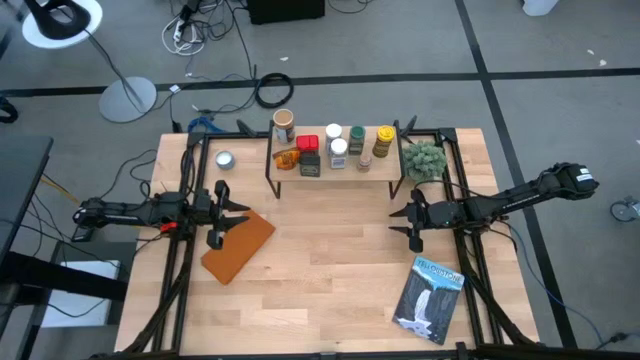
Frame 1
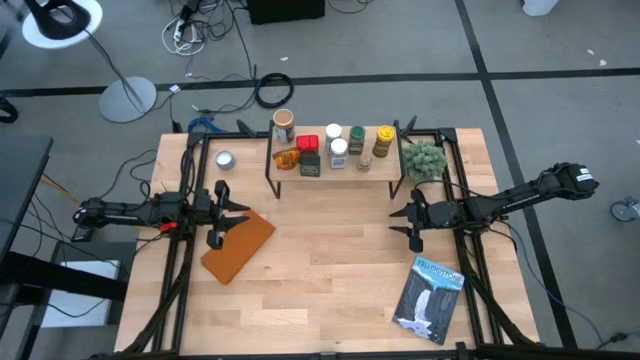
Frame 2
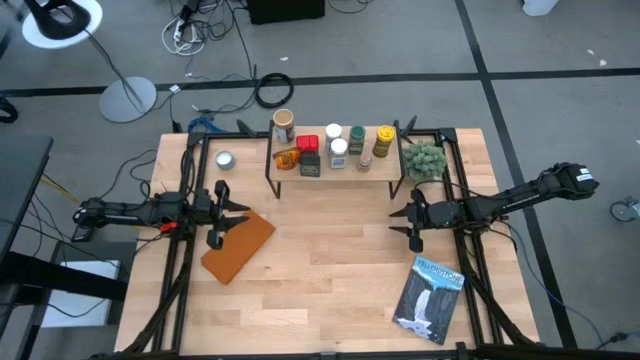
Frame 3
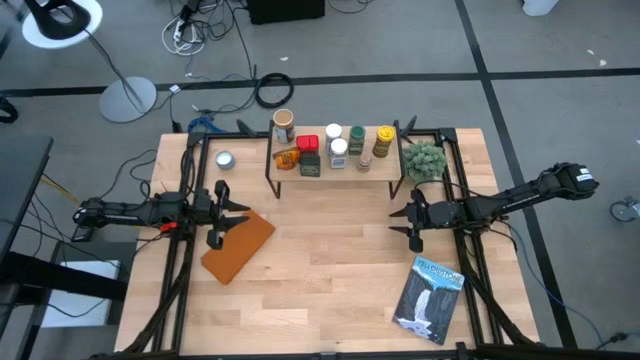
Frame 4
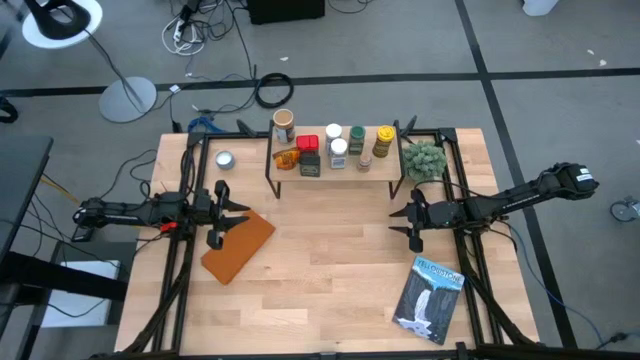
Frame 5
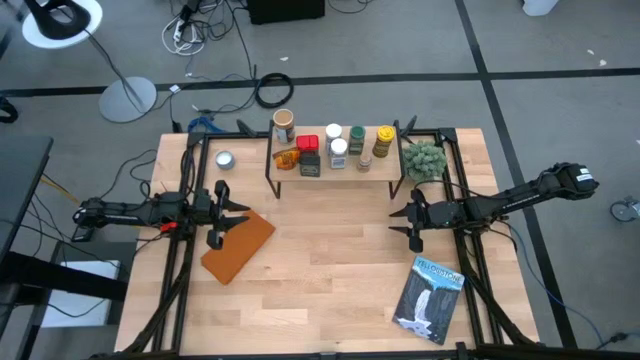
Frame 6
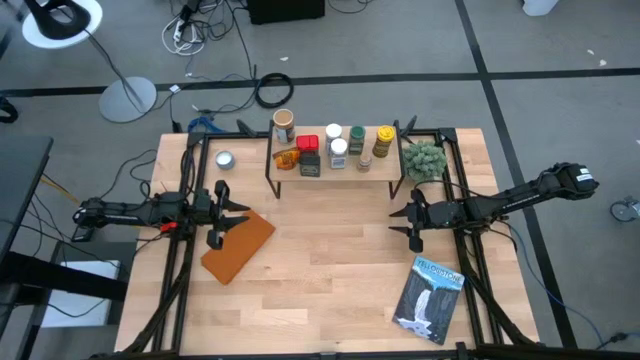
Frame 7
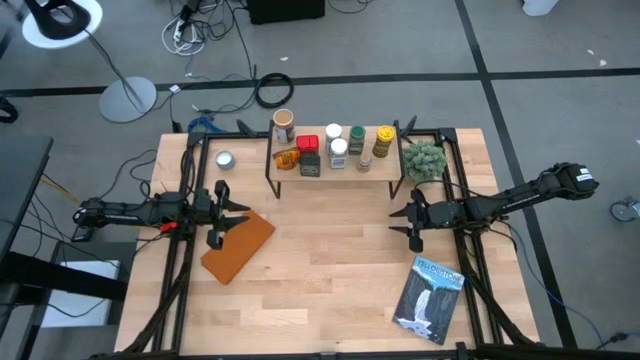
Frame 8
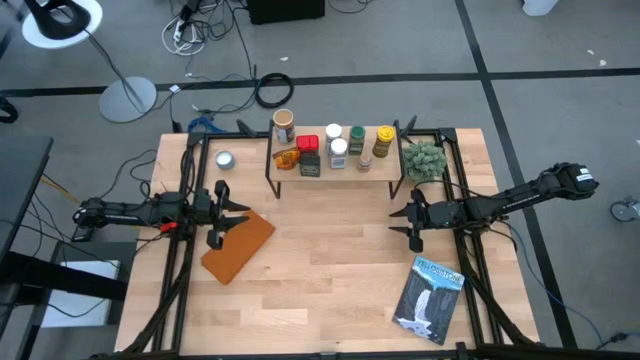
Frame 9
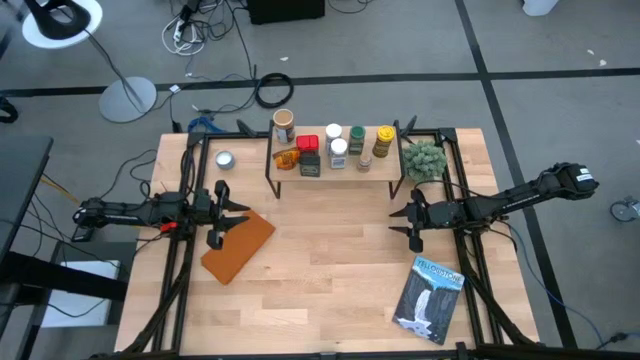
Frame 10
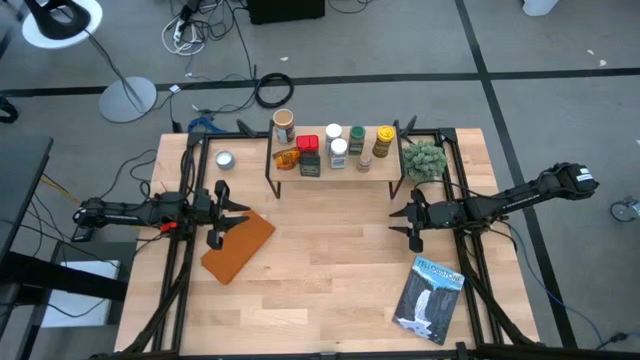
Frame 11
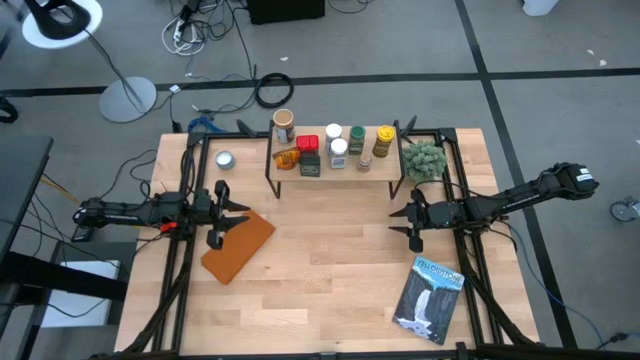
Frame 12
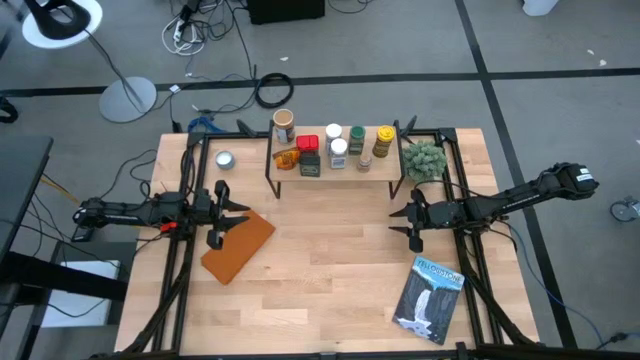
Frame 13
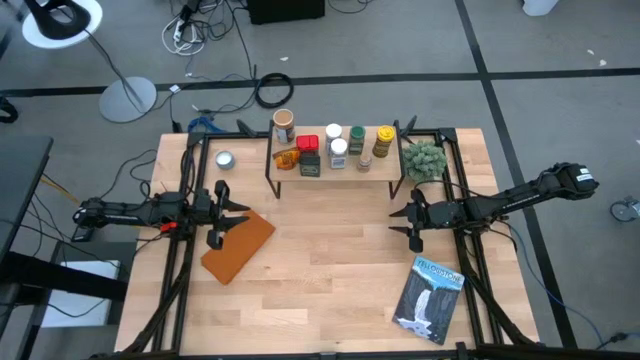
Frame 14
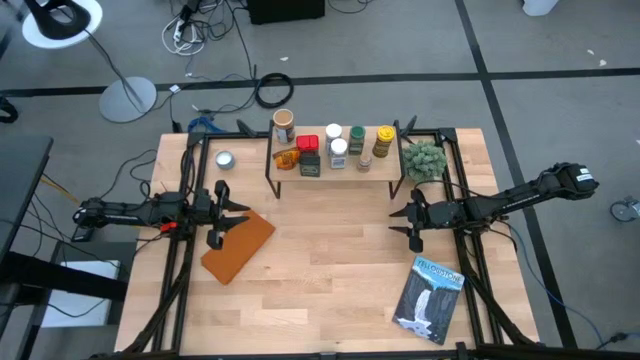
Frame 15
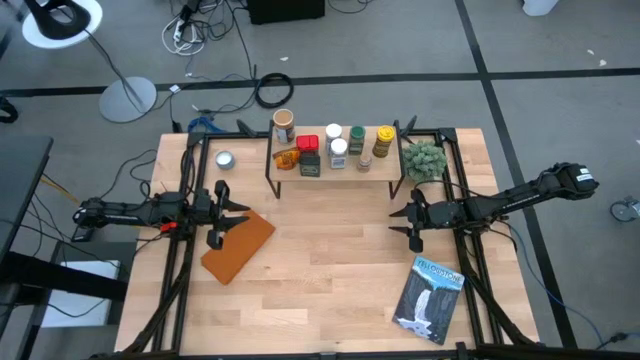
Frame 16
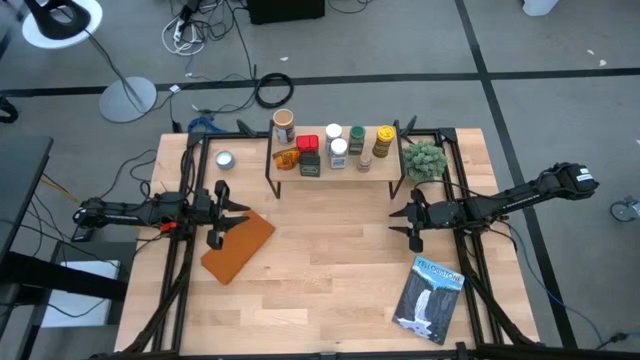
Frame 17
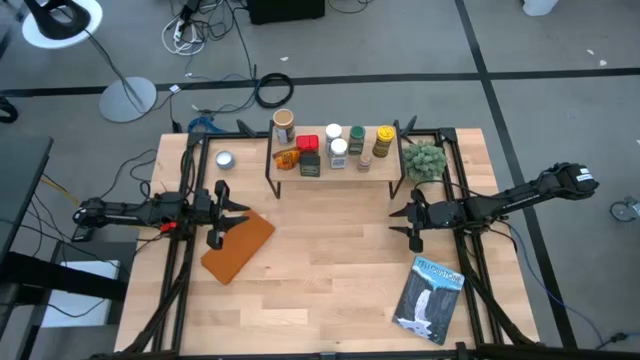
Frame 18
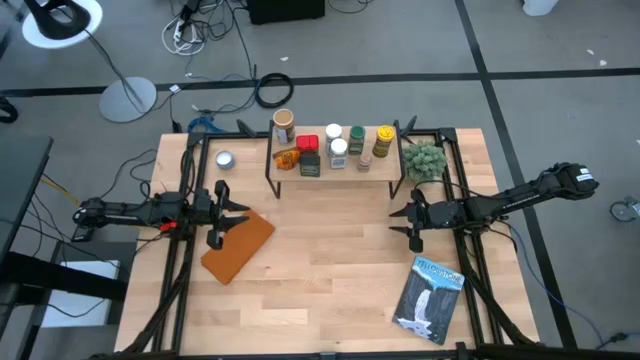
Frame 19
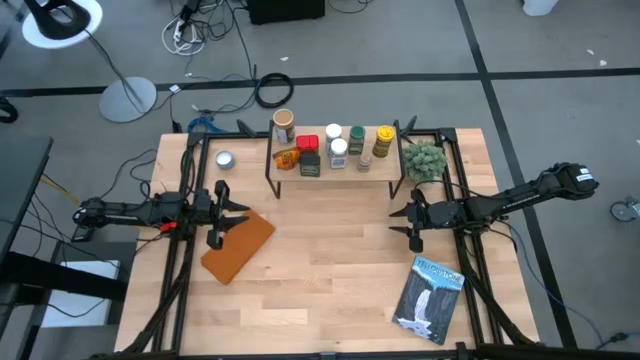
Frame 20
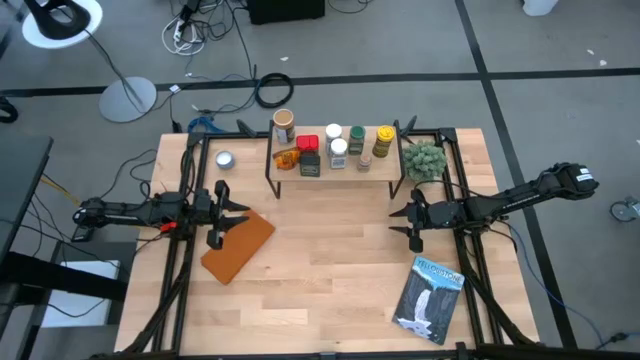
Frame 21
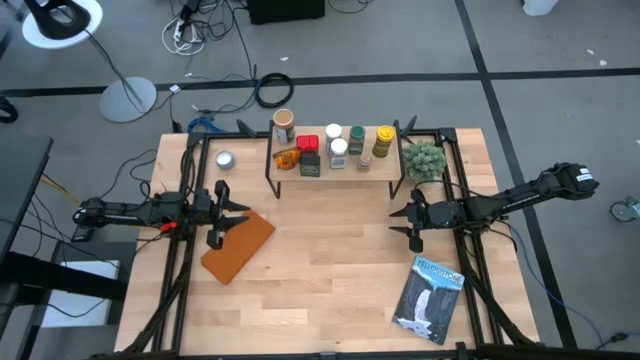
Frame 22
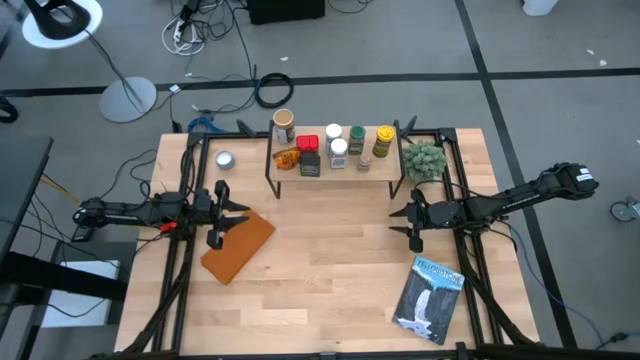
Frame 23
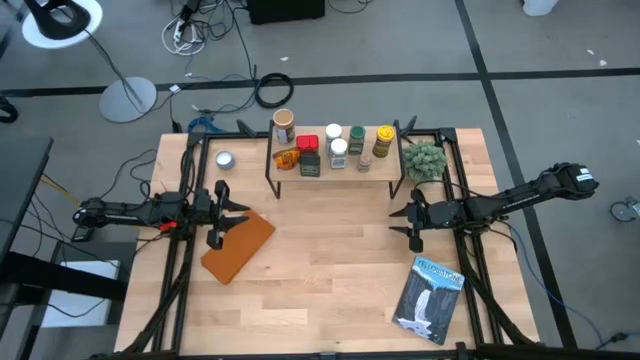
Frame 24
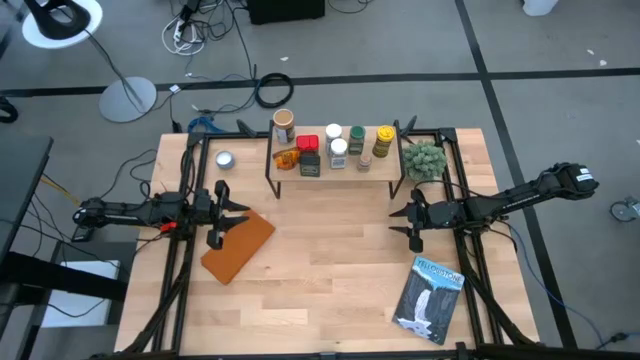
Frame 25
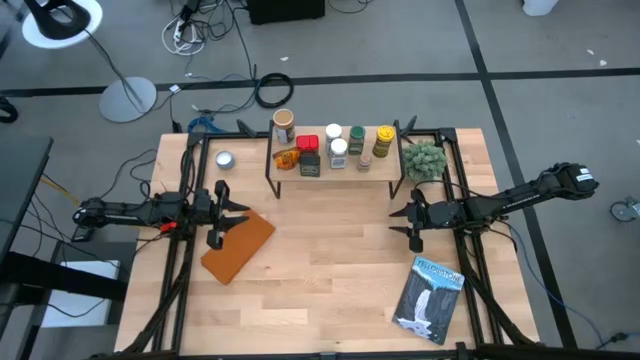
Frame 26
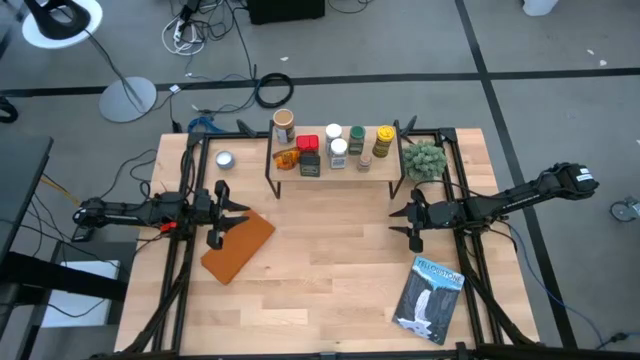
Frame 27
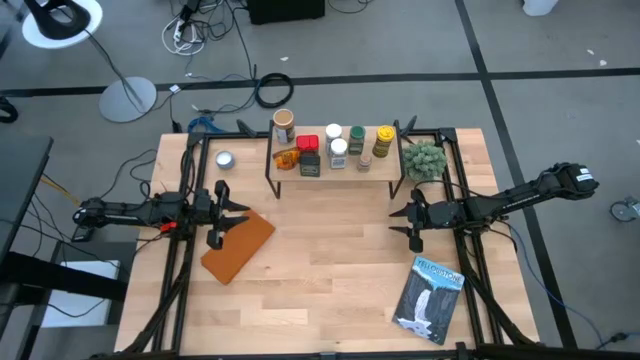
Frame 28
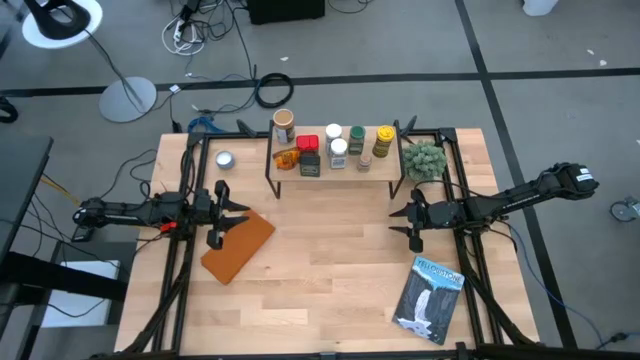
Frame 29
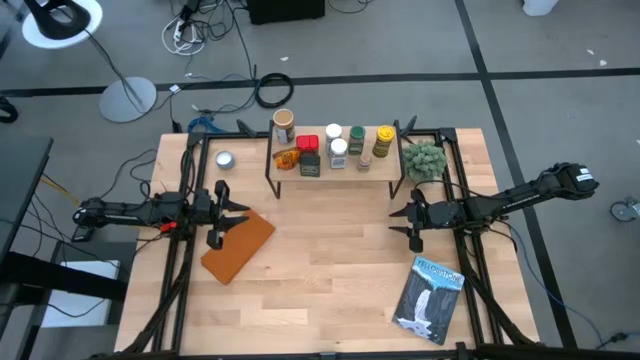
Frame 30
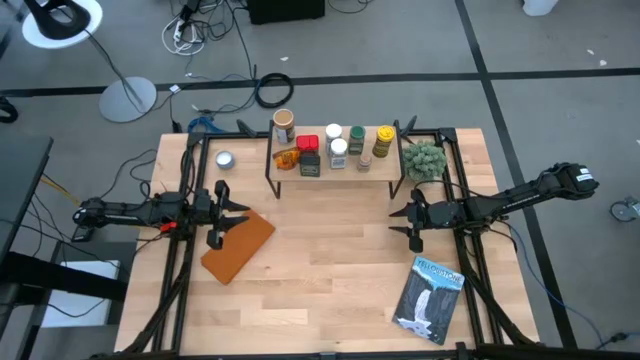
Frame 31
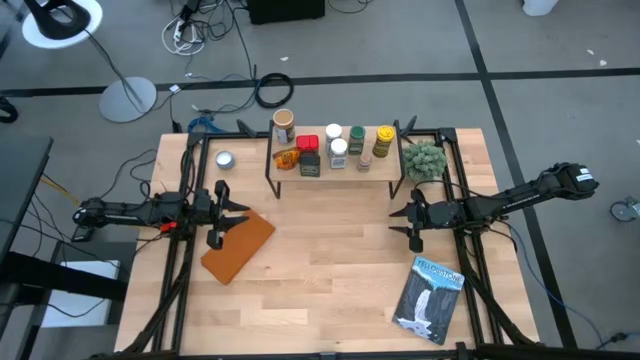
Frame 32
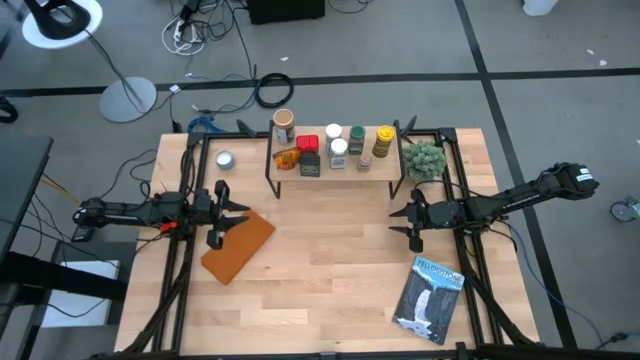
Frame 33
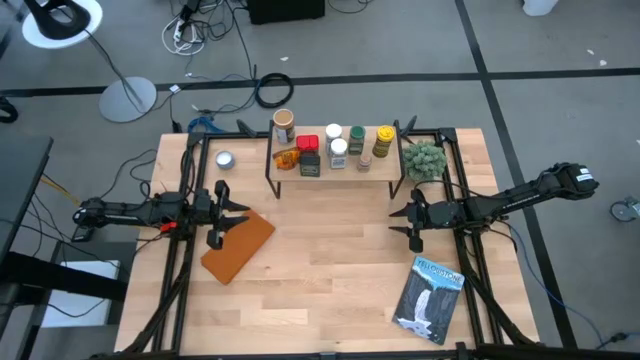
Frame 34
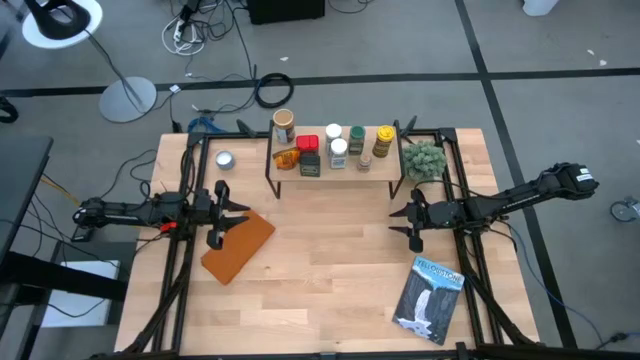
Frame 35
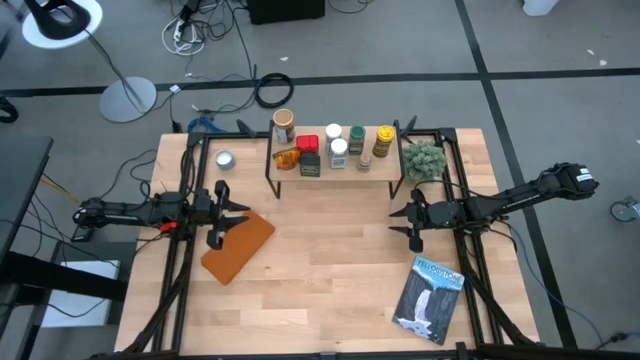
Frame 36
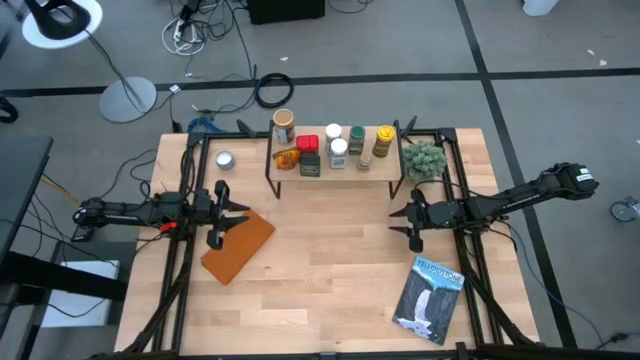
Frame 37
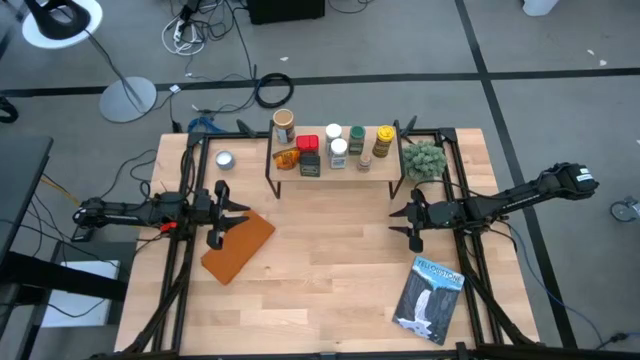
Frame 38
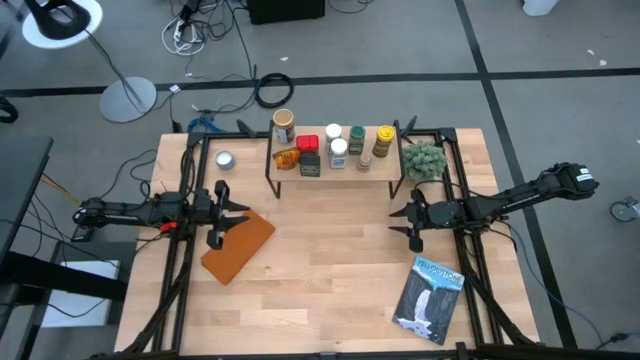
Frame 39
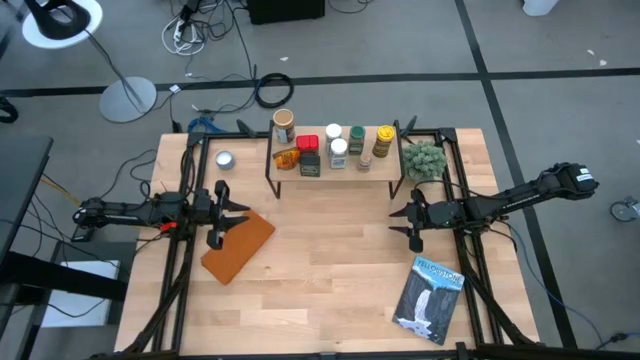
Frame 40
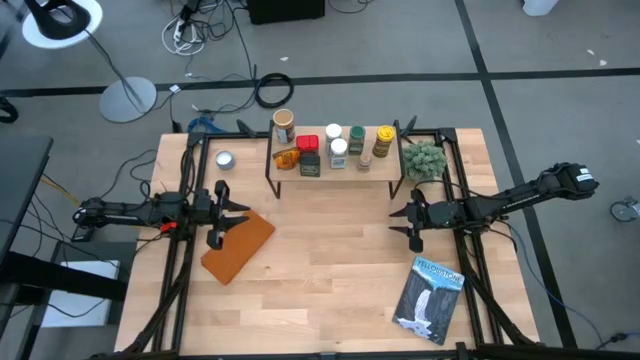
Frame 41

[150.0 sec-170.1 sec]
Task: Shelf spices
Return to Home Position
